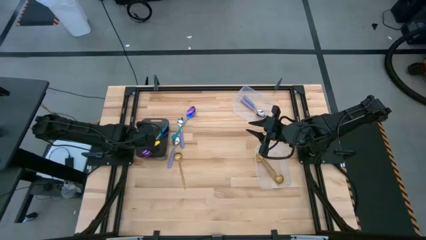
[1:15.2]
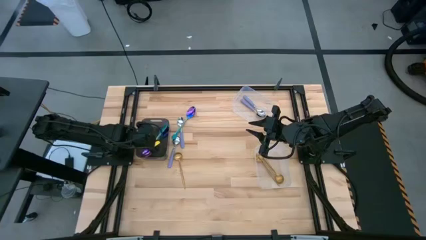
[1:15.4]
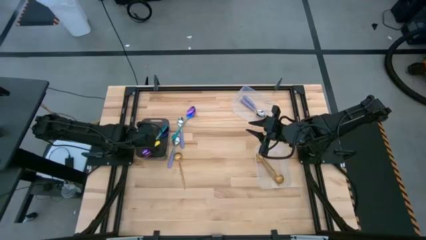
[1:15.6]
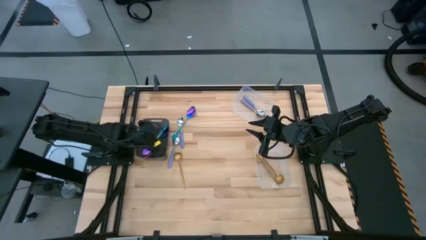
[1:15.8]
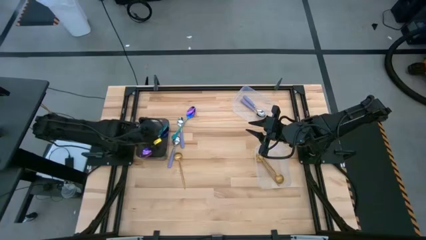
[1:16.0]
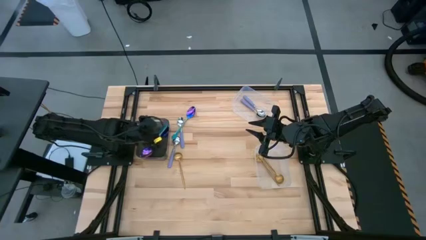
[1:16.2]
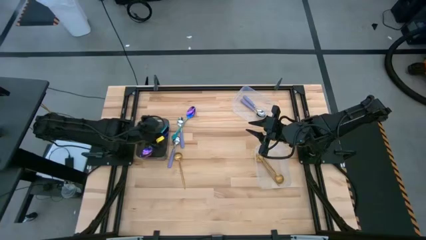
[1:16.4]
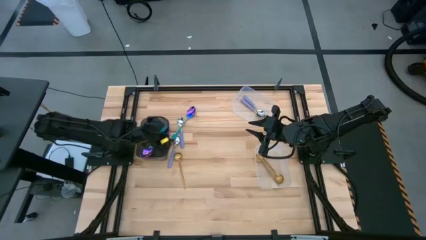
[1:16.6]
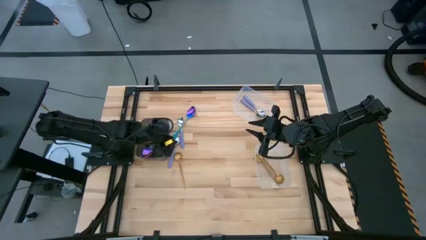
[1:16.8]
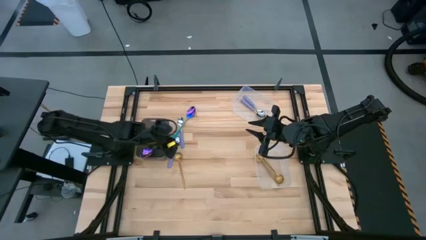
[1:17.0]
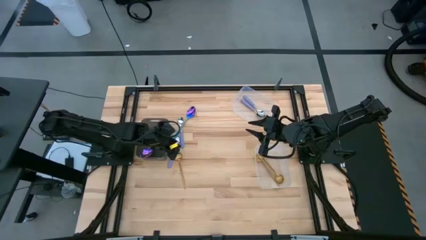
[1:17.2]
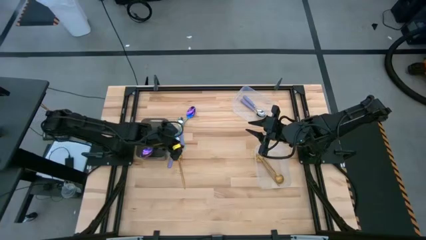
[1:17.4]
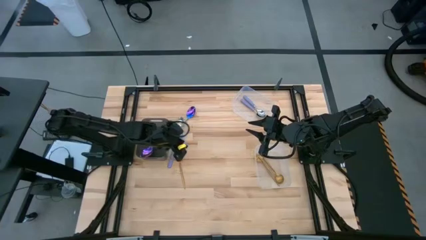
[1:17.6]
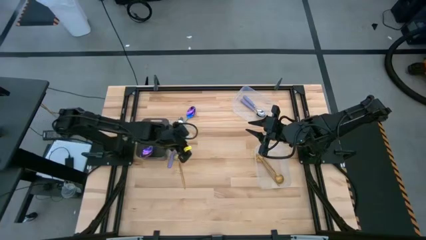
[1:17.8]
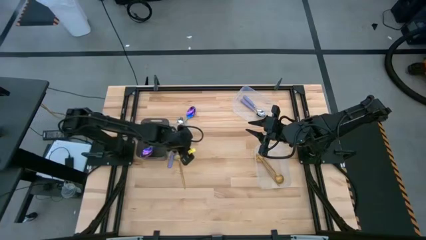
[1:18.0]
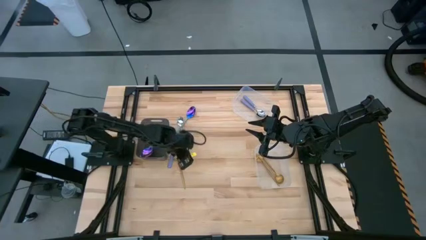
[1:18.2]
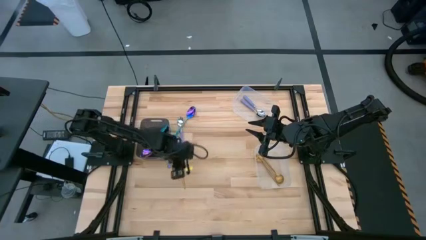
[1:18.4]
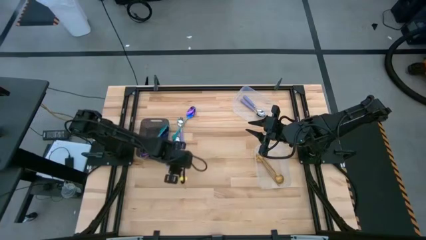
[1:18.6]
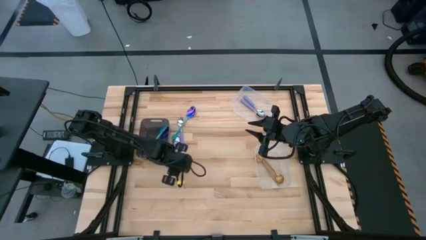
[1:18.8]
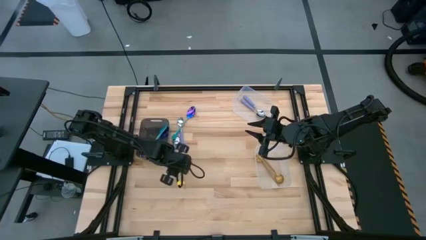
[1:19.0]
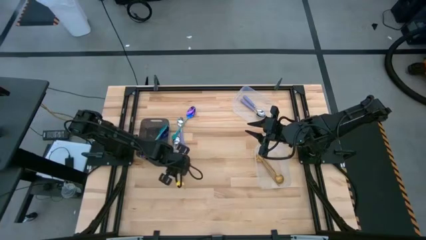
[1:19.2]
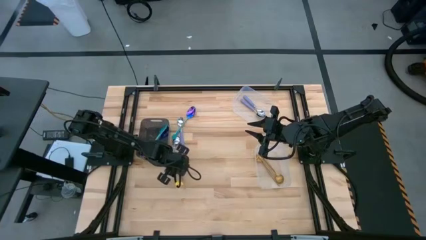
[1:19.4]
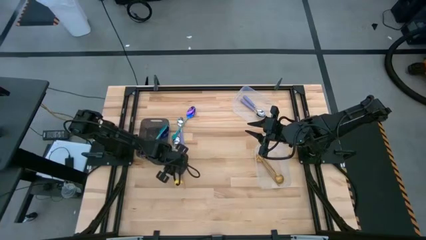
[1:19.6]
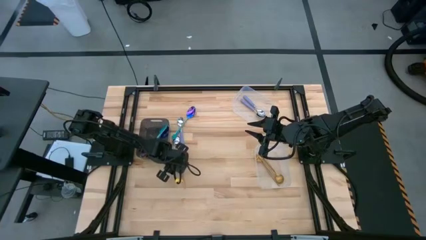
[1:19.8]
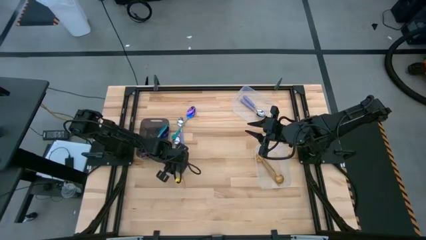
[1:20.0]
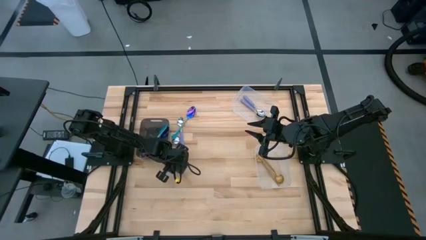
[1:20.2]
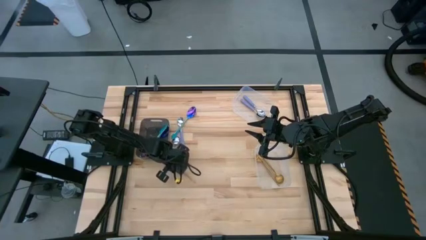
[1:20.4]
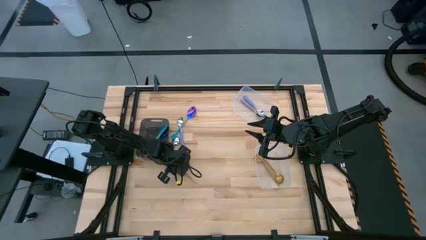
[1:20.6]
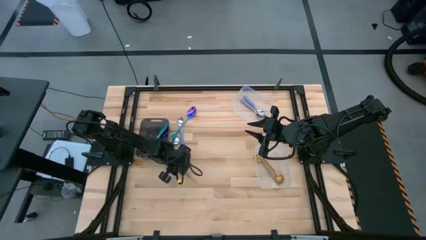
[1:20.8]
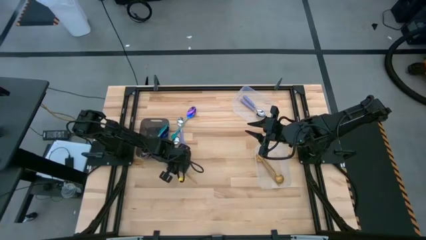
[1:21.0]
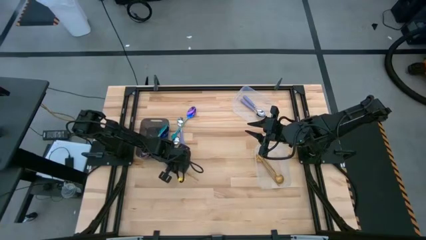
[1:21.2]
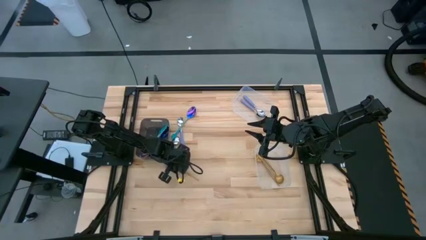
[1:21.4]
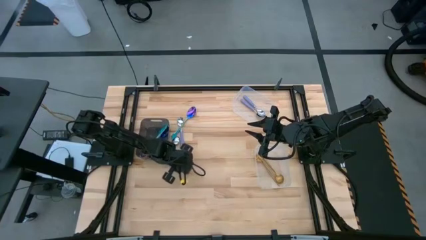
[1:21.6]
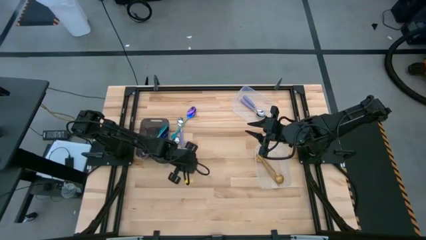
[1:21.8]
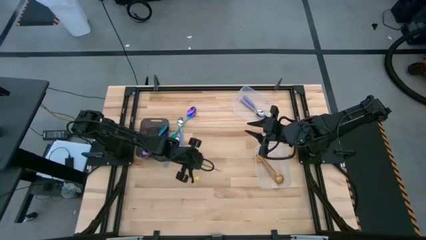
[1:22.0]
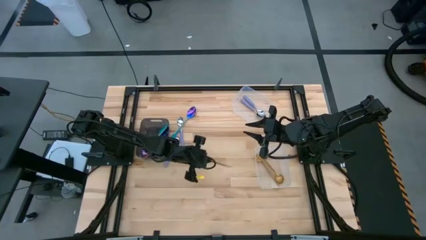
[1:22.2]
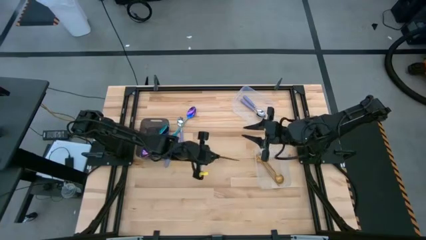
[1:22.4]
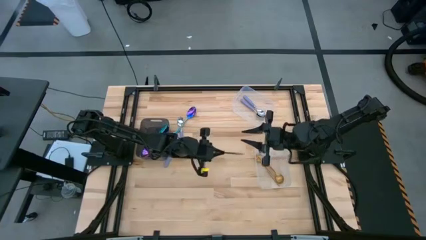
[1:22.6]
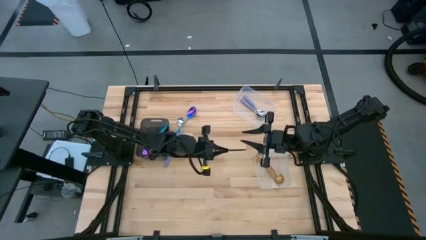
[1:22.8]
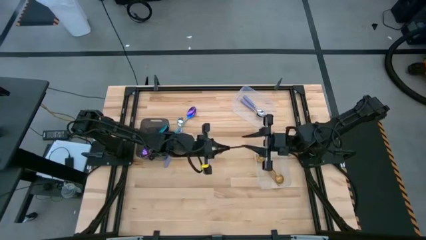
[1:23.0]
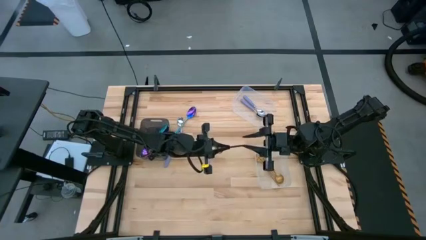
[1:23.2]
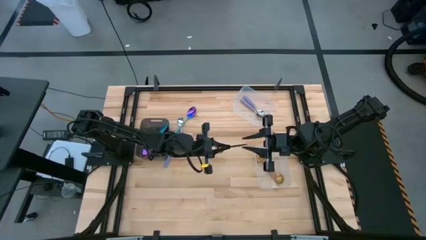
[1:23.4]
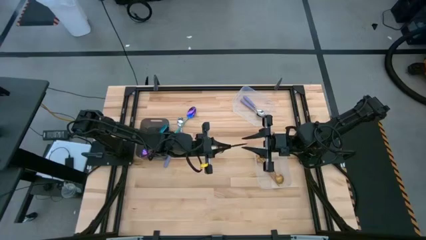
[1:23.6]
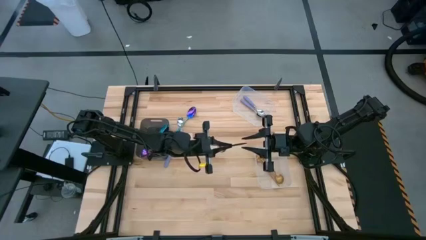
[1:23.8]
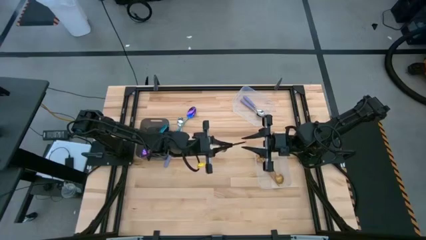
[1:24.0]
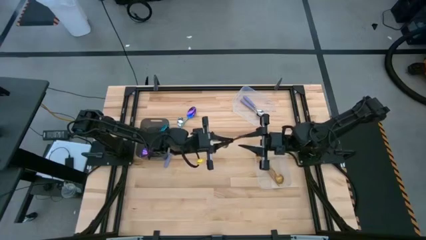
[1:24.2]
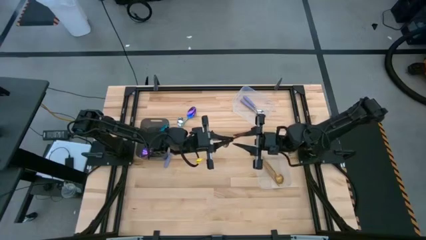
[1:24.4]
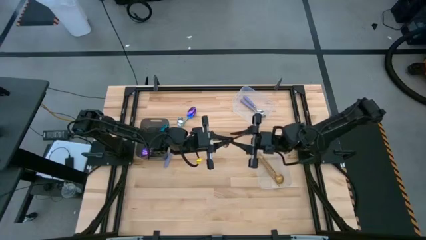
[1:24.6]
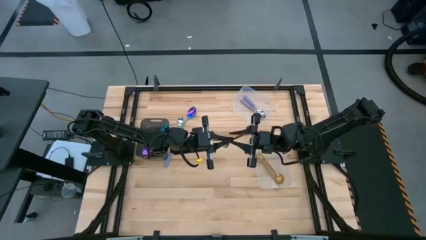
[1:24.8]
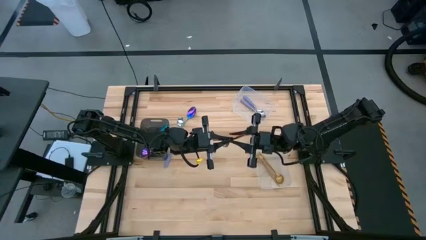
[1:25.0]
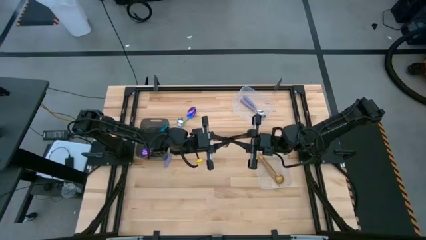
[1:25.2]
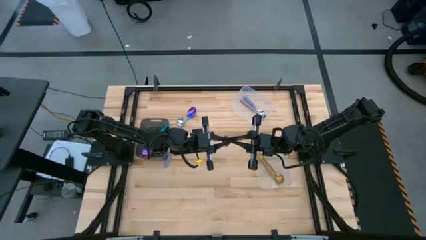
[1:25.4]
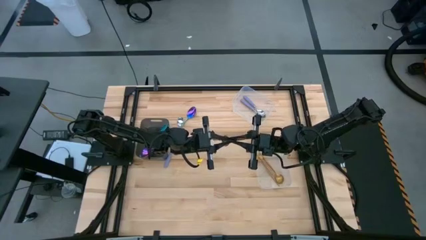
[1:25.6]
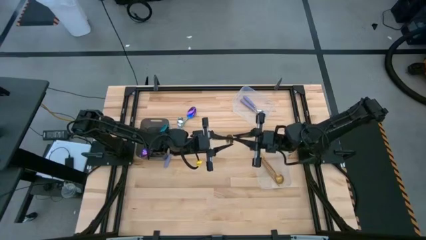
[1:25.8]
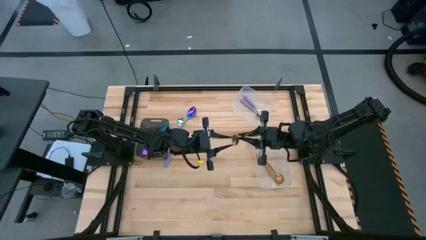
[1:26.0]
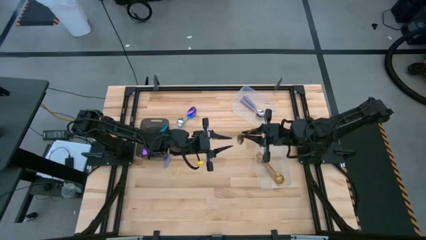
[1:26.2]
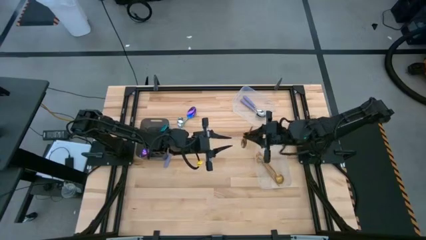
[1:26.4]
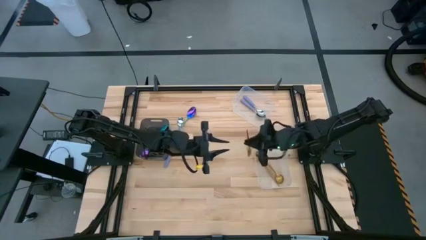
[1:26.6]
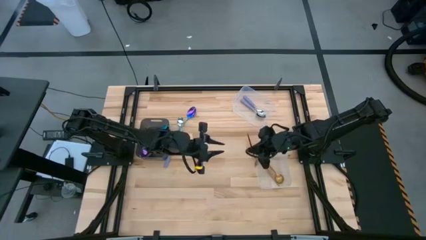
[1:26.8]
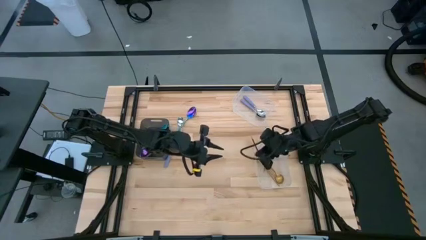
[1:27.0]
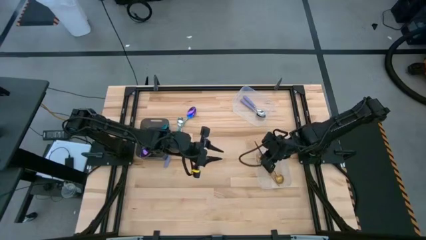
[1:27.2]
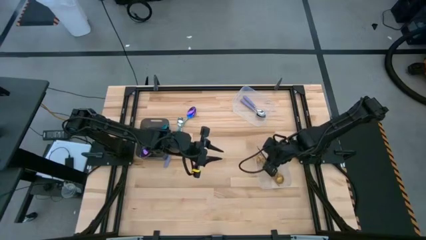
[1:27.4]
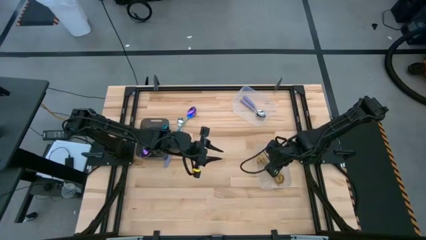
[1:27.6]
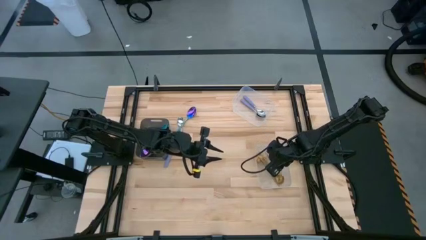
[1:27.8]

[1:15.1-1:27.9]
Task: Sort silverware by color (type)
Put the gold spoon into the bottom transparent bin
